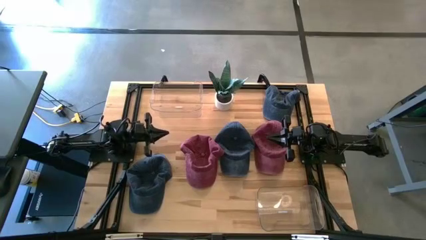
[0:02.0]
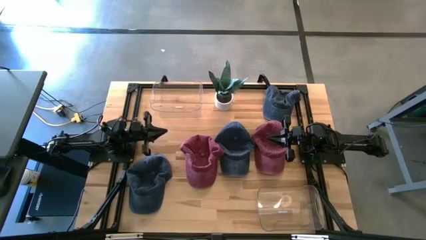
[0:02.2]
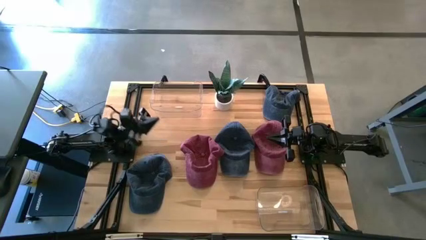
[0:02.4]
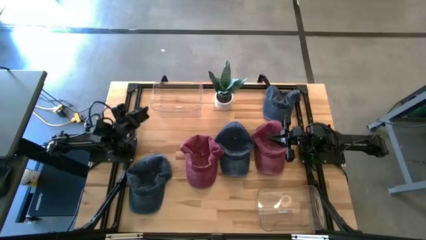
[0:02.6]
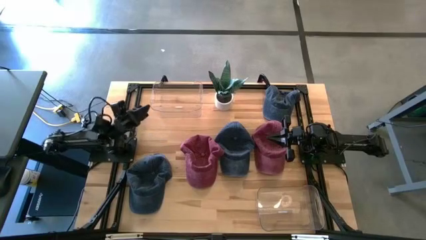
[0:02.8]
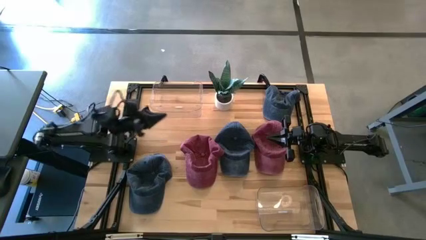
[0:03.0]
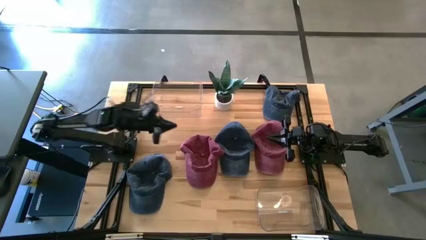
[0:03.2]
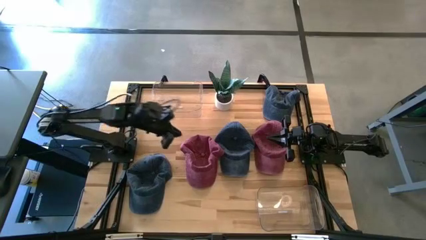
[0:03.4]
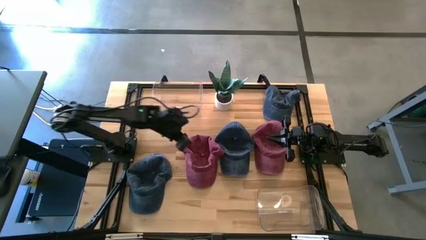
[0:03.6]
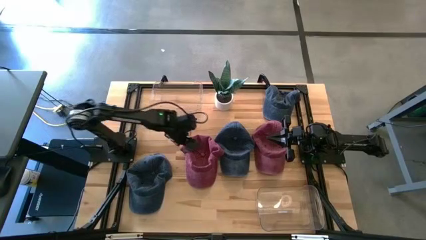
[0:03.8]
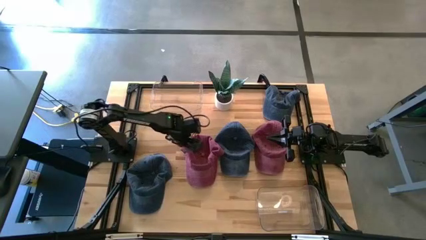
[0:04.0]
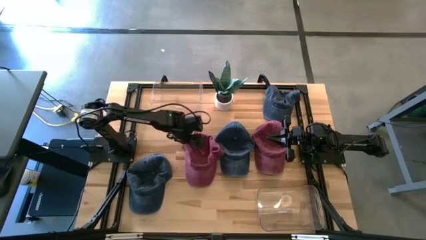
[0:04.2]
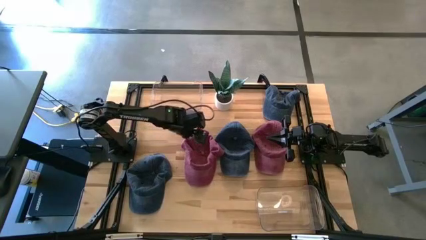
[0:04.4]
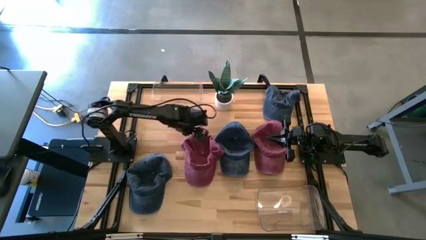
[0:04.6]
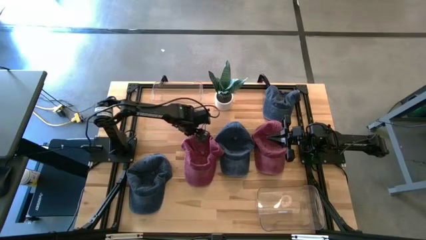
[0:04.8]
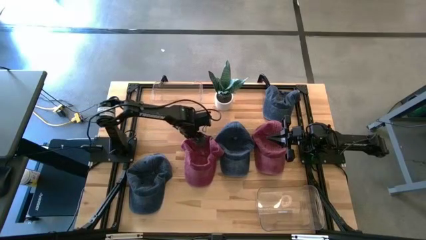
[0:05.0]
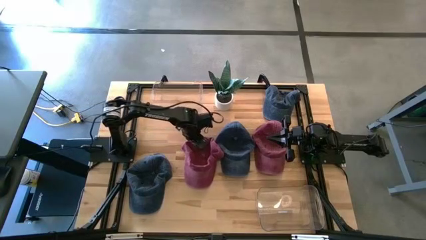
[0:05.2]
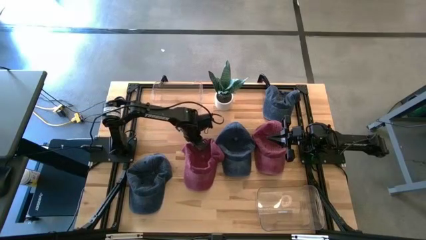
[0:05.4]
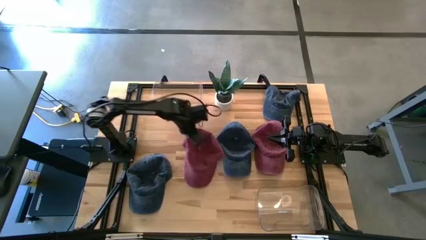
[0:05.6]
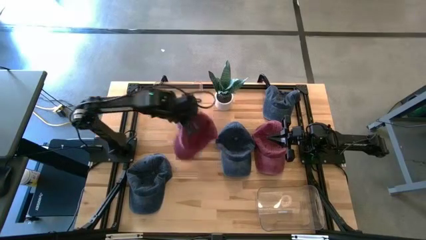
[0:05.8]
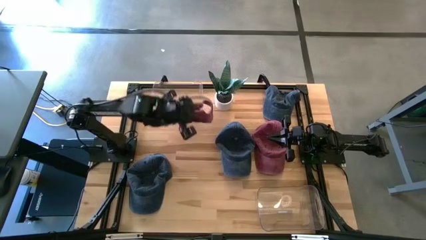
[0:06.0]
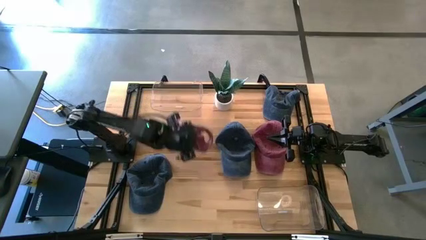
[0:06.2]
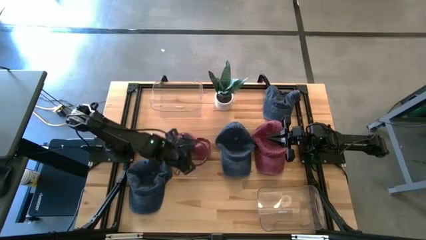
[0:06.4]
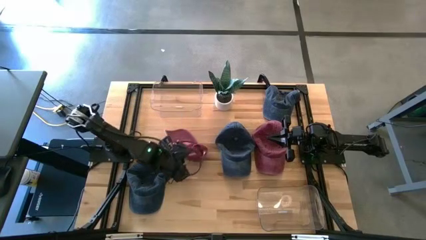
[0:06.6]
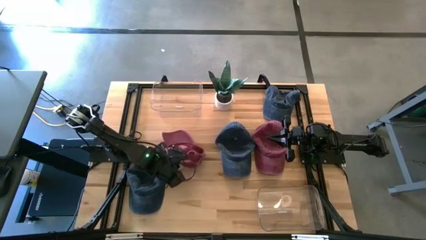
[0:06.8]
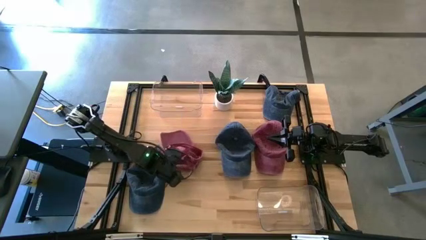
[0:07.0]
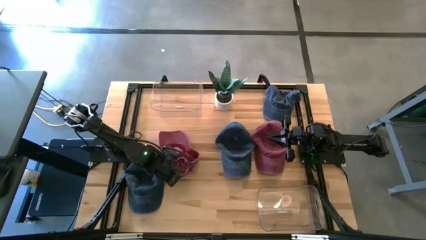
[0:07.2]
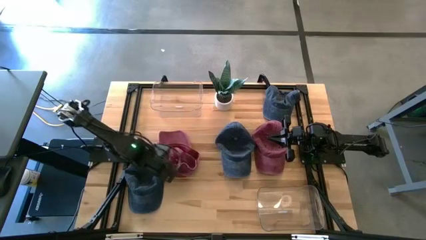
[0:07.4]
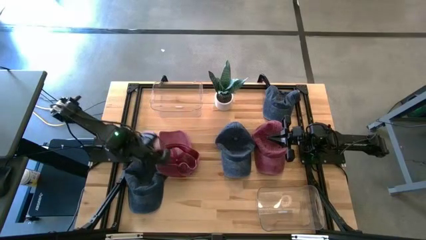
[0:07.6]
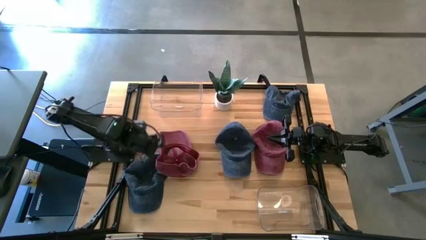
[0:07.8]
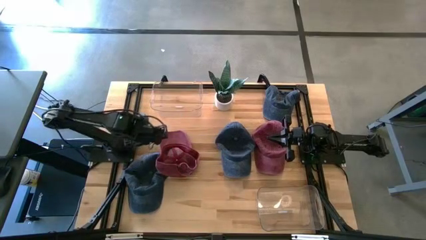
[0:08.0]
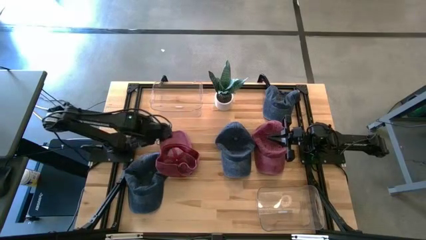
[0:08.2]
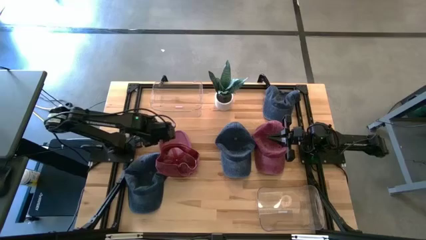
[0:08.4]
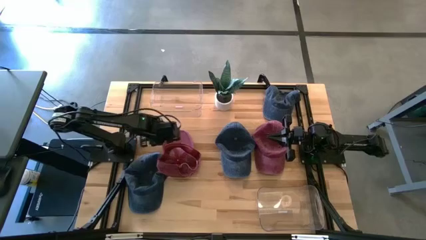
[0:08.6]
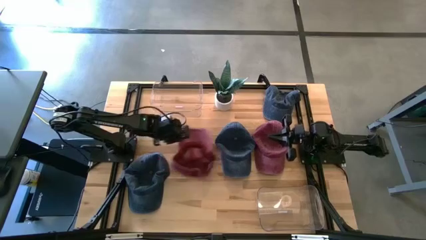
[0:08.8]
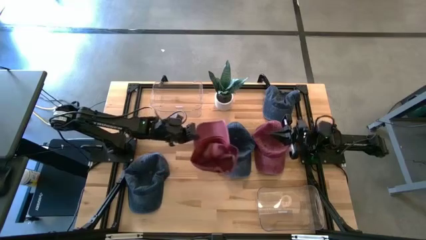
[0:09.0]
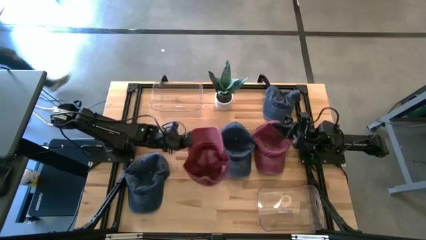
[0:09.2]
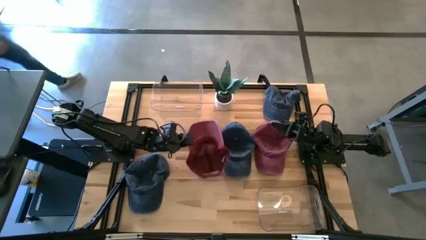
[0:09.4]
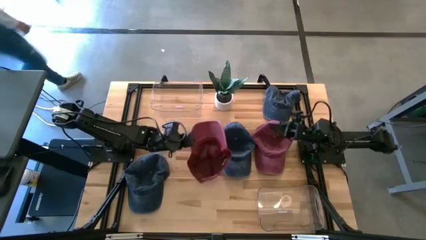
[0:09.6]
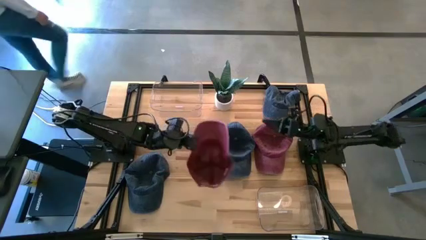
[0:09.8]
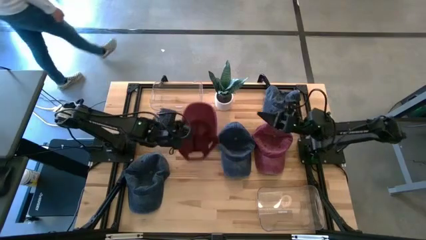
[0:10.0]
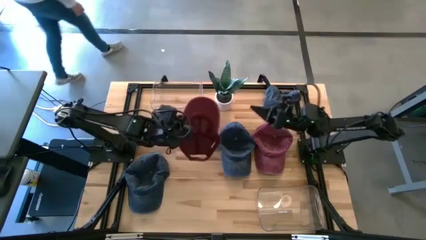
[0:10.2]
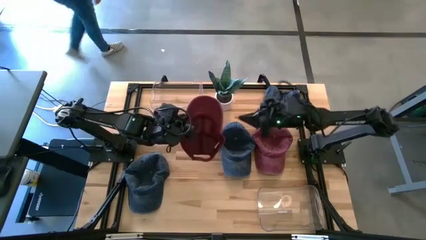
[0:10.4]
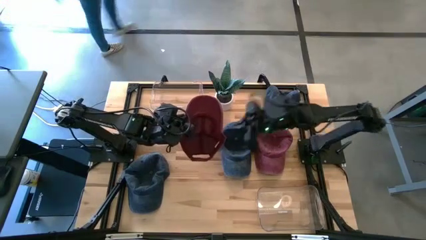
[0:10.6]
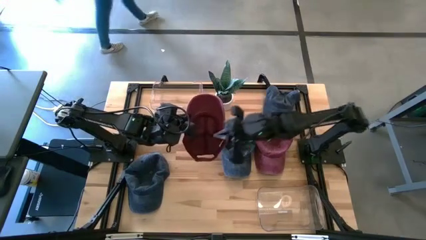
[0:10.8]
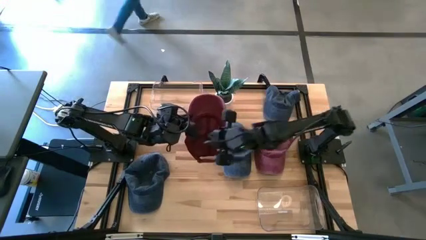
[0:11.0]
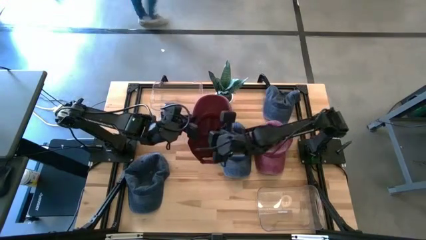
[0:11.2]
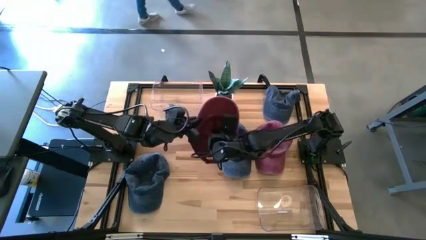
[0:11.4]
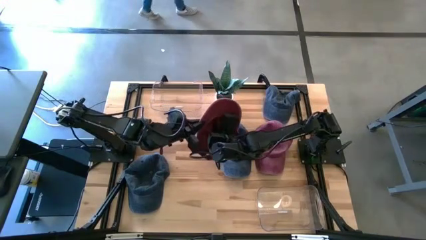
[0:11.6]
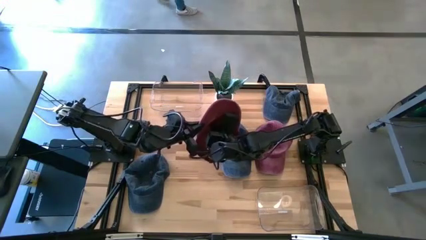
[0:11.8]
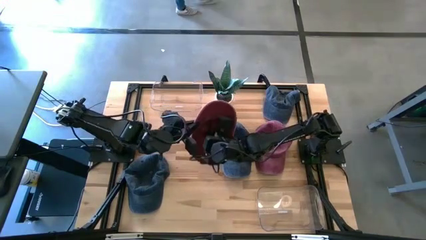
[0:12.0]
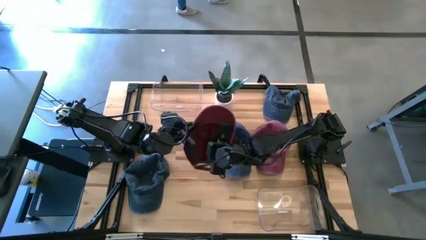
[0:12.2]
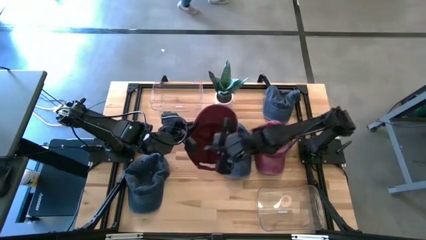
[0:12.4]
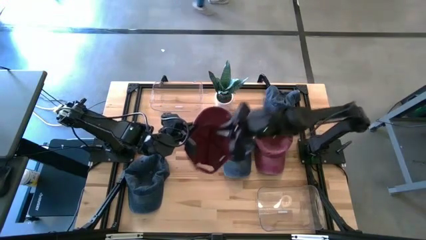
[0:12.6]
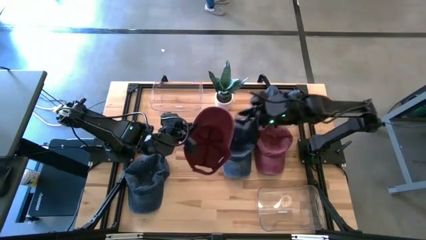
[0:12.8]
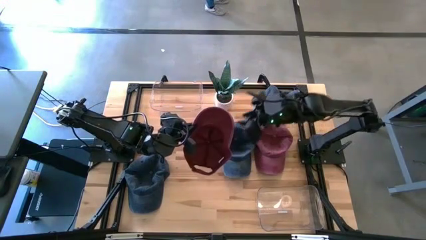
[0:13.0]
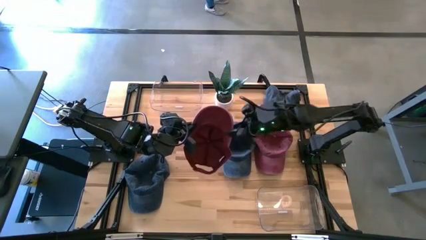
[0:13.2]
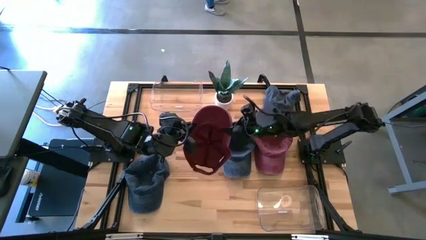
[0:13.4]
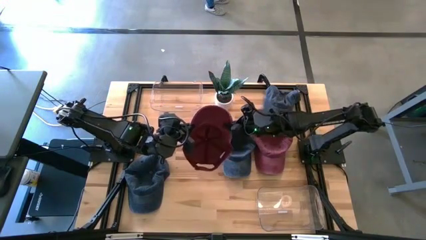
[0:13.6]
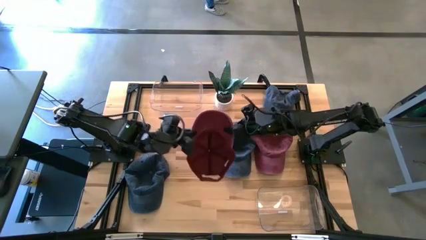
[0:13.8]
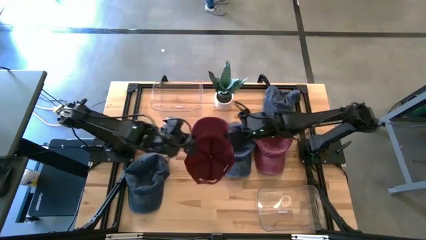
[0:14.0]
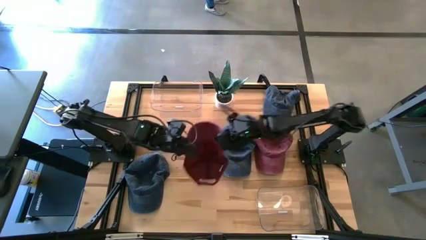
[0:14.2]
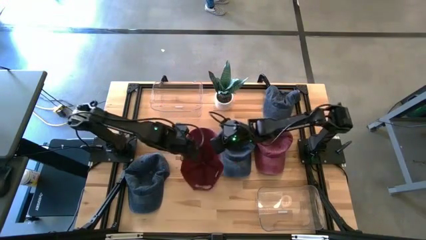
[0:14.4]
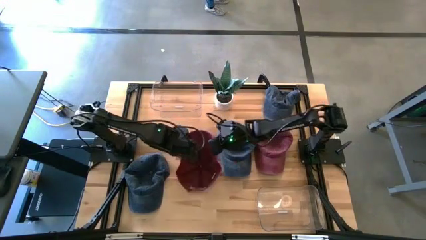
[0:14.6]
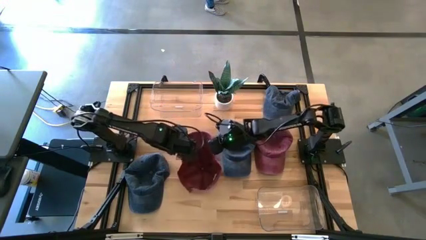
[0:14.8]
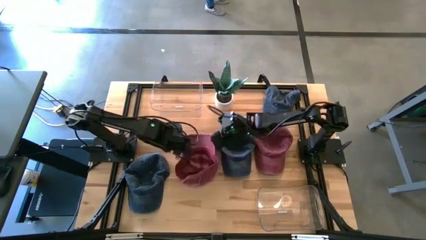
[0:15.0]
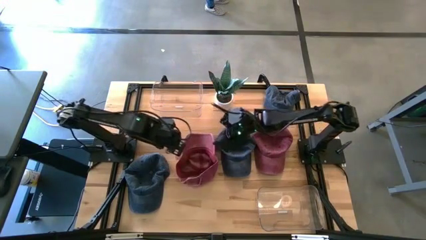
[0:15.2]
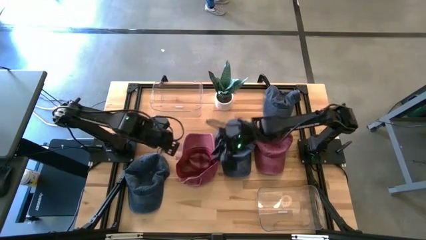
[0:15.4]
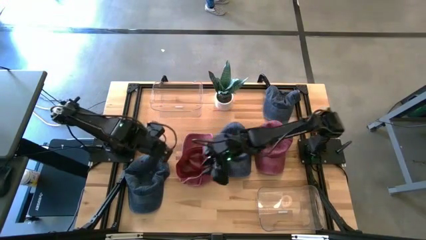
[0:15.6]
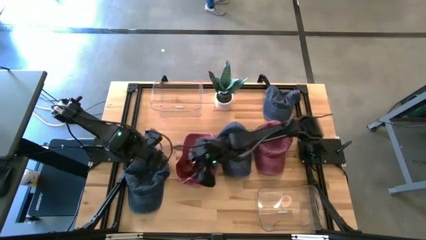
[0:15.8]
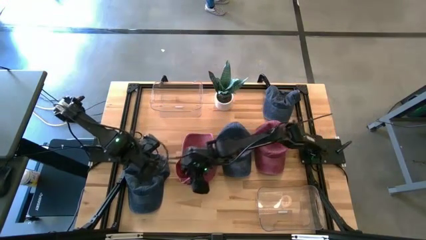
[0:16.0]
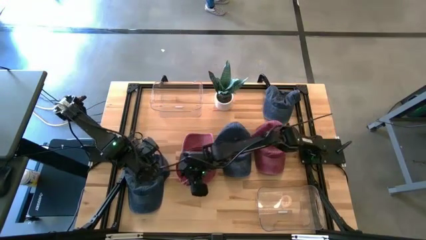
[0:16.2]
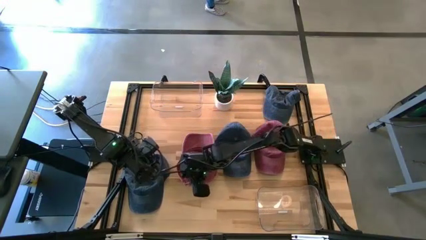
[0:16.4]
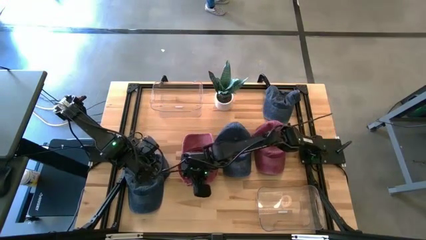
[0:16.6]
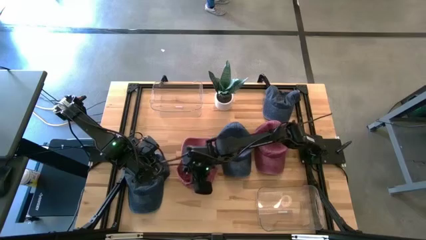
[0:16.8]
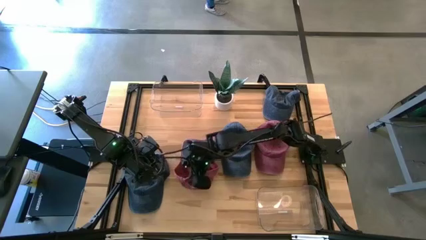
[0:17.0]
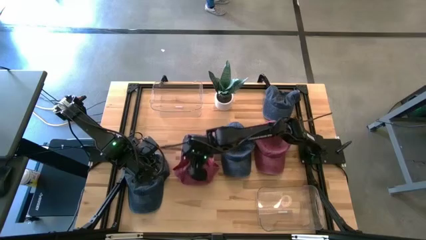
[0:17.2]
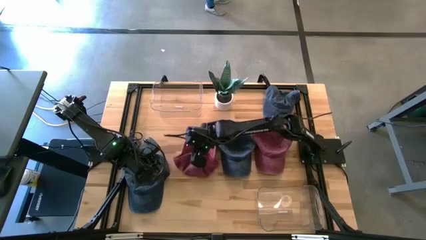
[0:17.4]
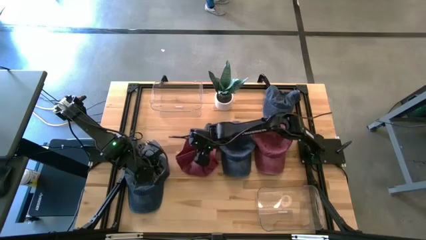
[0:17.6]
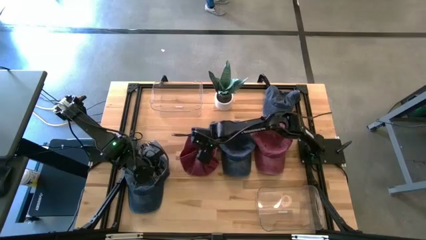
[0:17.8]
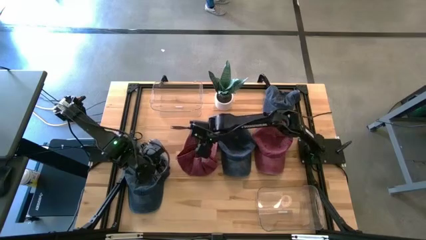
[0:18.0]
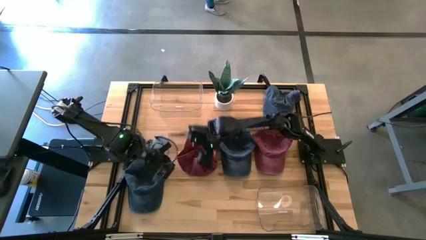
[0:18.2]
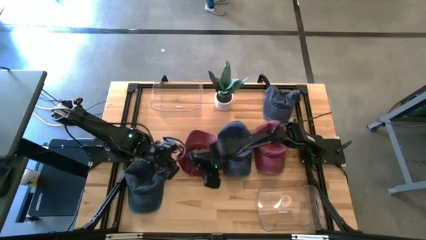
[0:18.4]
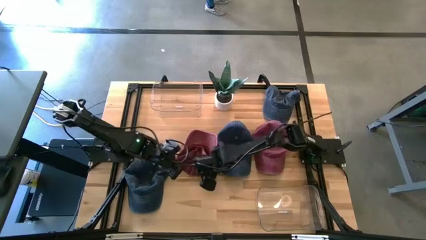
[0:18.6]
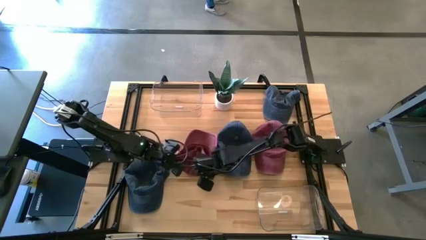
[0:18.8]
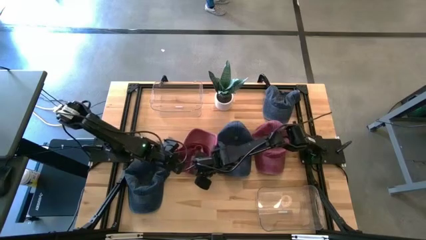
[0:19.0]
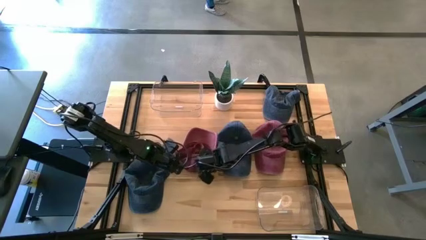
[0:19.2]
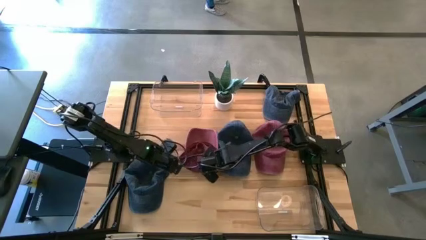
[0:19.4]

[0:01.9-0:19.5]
Task: Pick & Place hat
Put the left red cap into the top transparent bin
